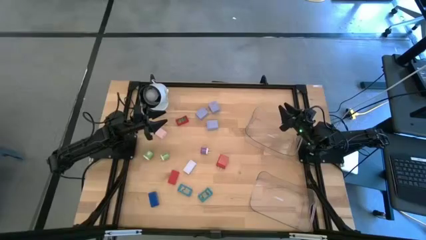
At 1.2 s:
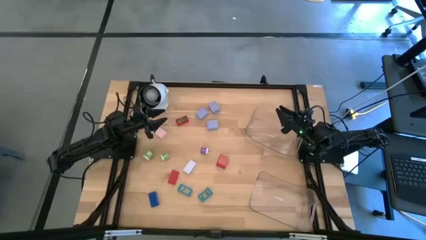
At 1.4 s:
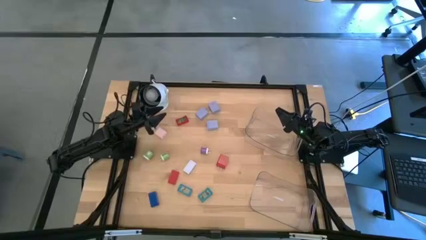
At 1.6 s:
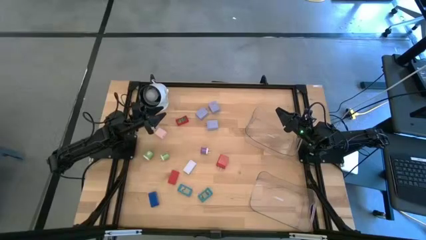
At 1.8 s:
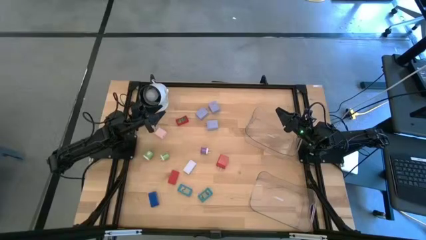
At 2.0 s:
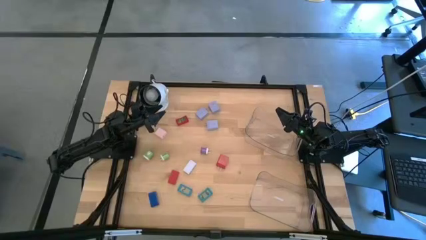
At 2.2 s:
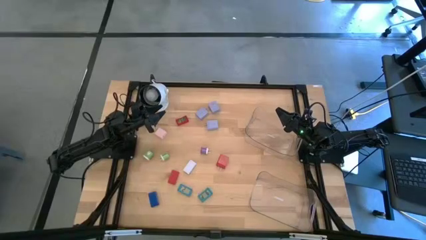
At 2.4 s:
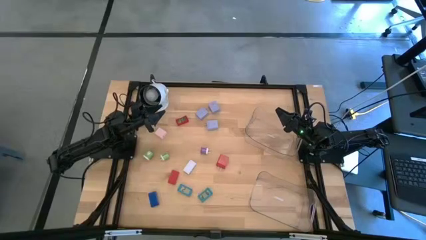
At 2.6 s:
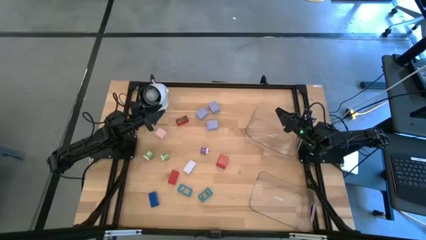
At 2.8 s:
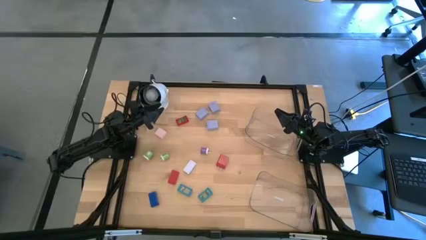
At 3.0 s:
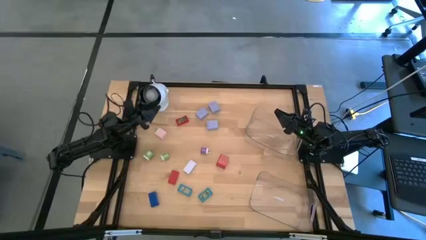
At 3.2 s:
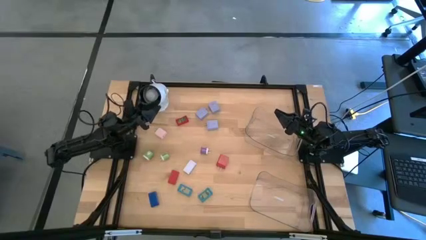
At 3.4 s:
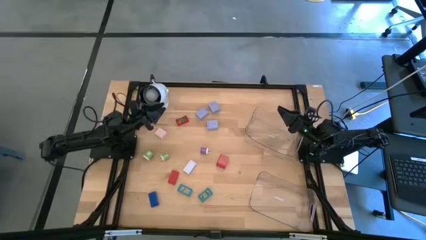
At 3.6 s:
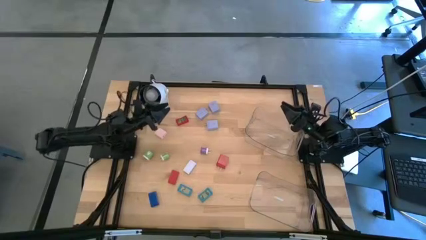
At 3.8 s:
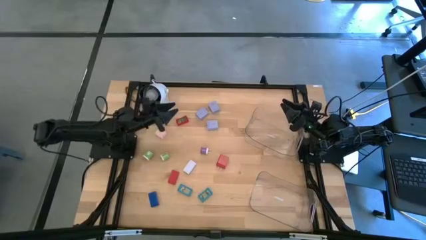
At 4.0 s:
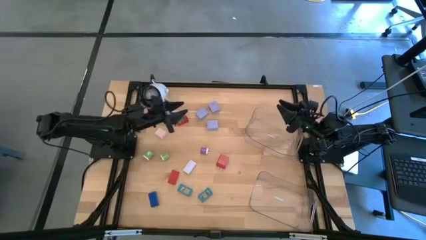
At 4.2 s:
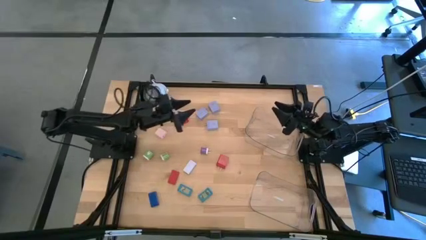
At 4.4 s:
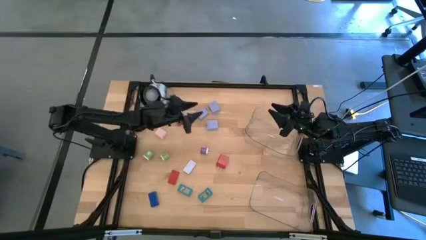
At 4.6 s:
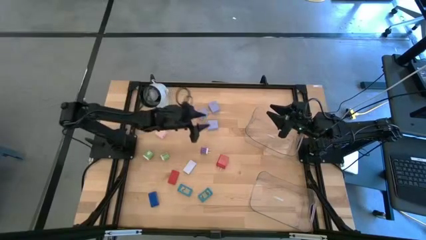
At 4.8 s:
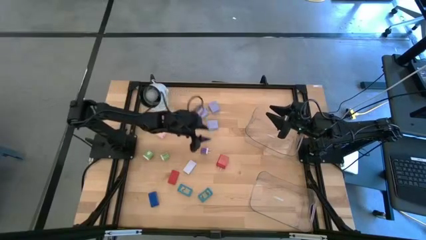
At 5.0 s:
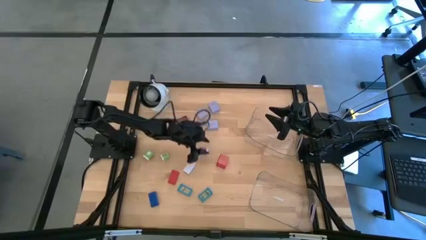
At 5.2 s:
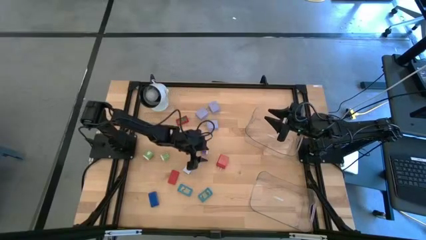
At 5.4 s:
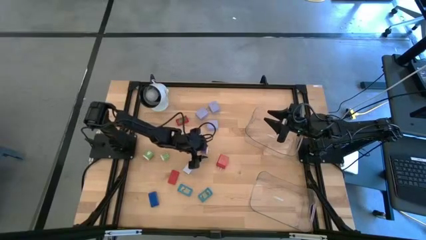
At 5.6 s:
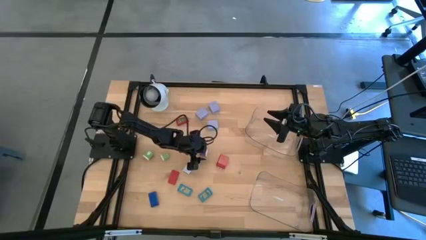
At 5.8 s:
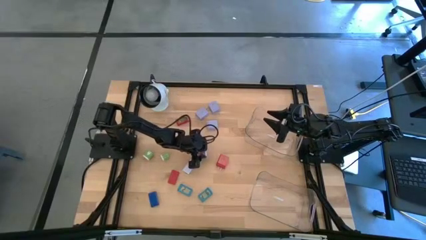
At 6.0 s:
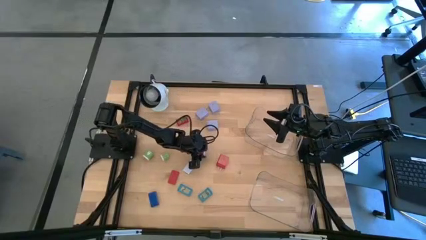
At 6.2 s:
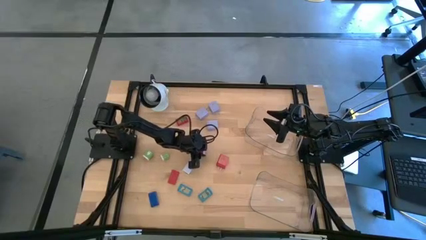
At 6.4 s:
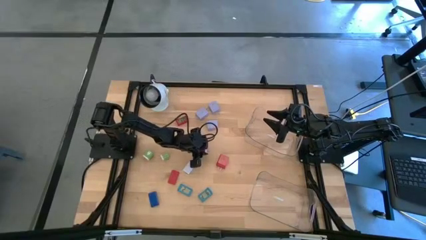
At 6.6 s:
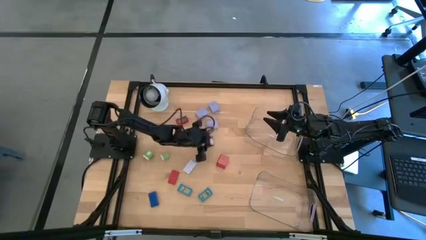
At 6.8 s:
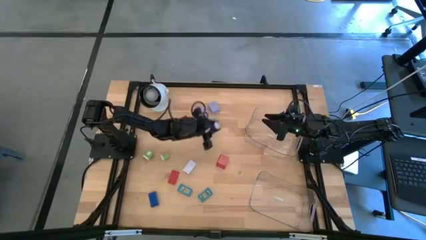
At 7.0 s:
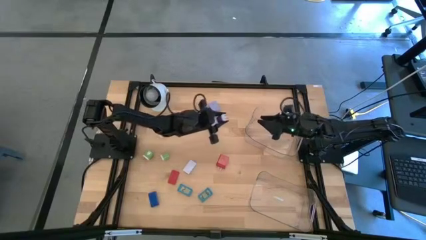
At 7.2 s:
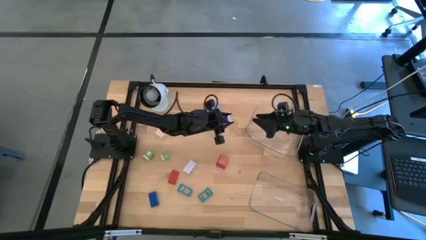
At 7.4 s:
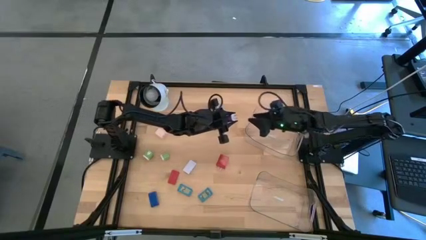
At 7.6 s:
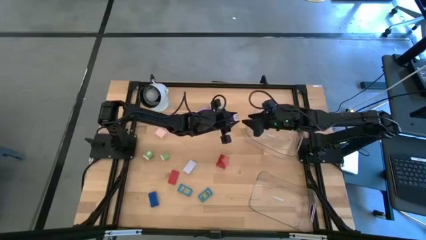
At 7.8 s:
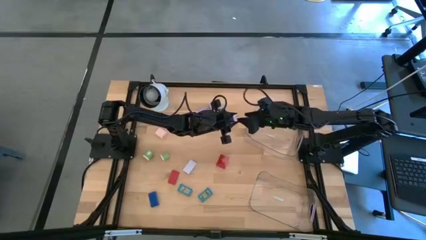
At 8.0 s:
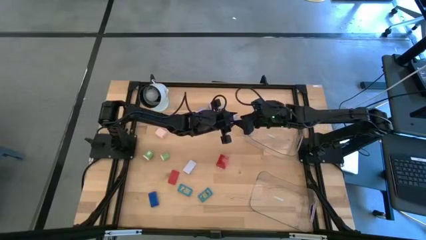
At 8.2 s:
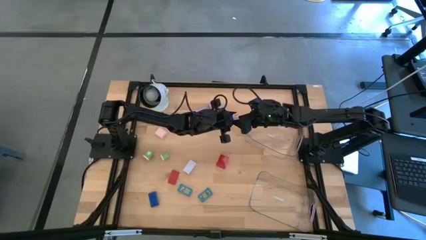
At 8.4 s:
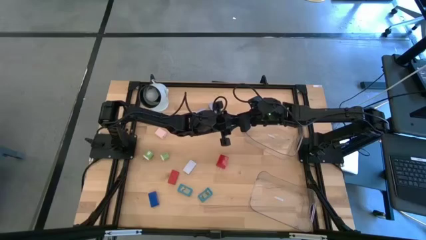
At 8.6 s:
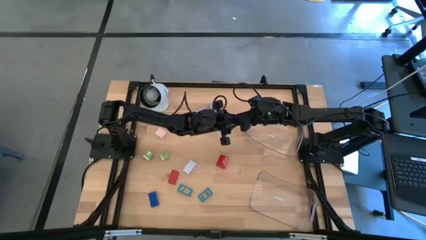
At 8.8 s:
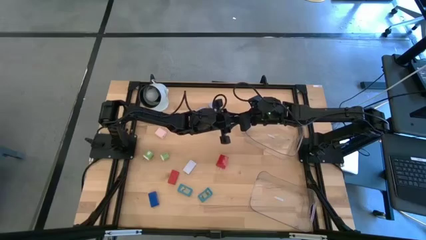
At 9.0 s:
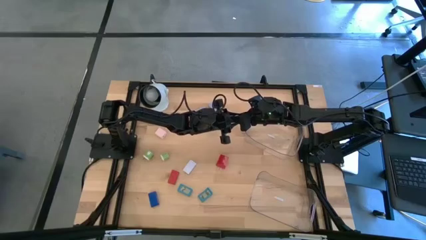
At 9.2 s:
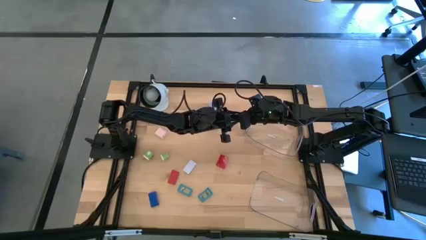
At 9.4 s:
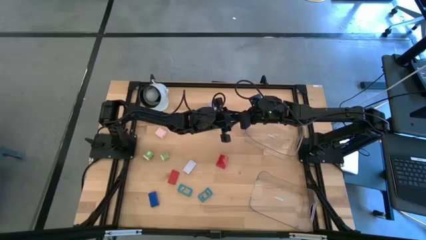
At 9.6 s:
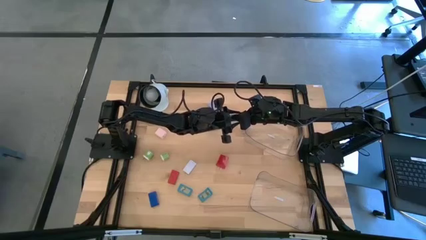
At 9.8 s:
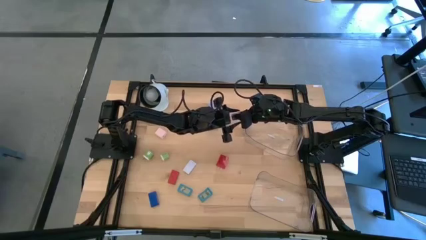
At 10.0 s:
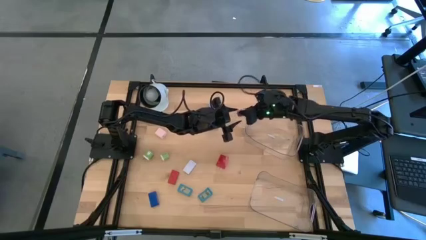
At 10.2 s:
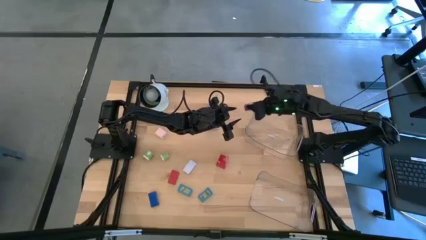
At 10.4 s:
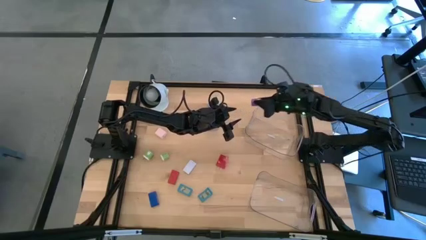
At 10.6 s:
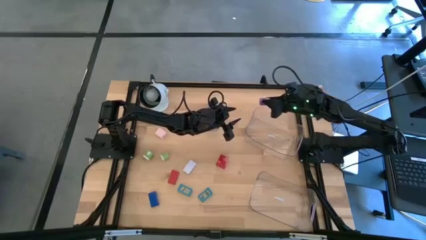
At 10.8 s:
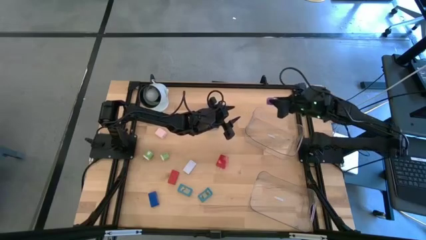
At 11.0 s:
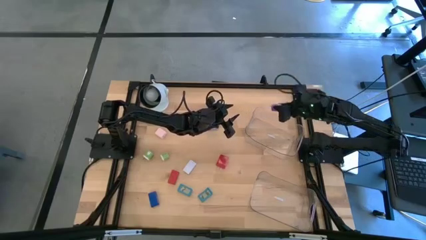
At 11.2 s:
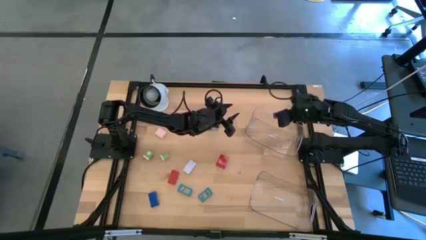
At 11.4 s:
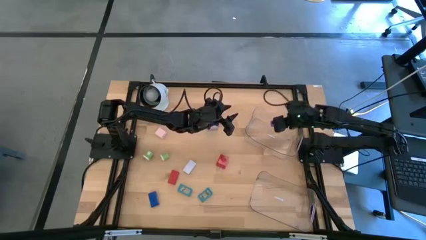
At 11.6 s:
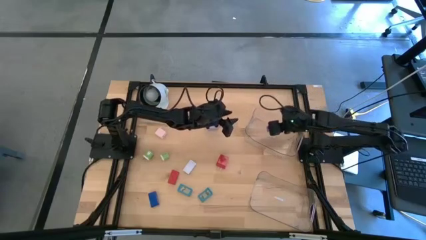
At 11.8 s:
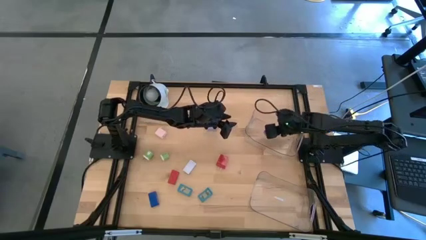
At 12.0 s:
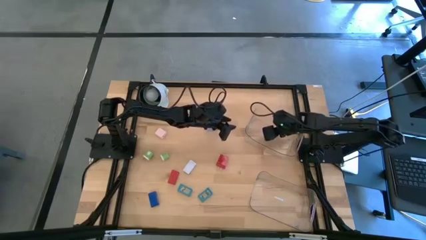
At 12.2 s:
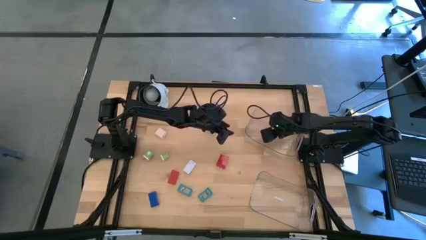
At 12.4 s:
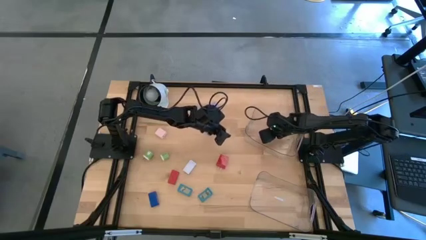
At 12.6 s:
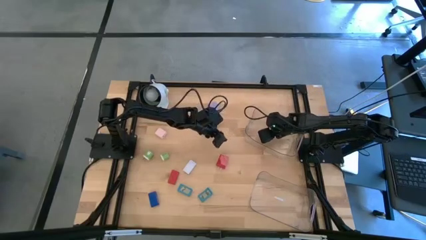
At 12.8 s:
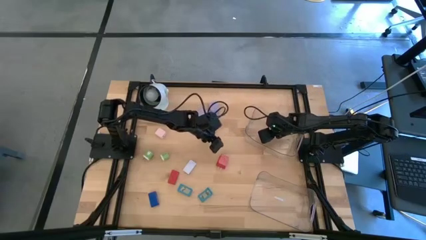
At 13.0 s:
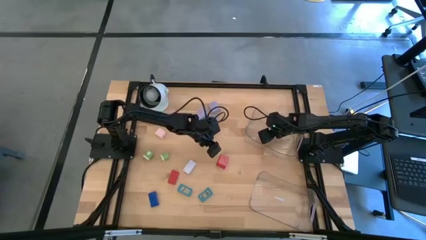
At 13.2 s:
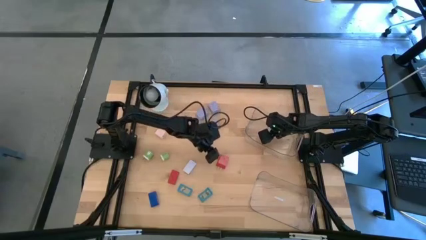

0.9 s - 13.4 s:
Task: Pick & Place Office items
Put the violet charger adapter into the top transparent bin
